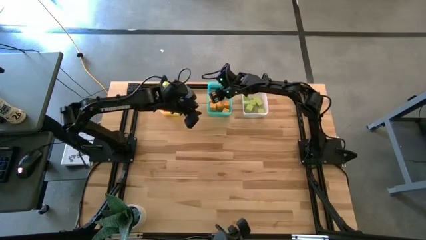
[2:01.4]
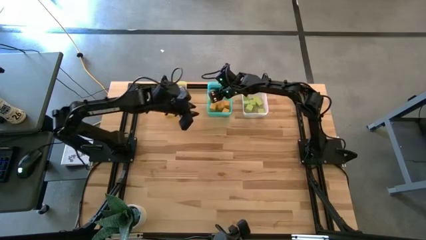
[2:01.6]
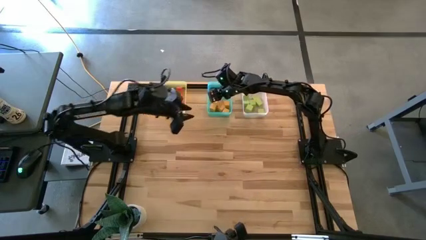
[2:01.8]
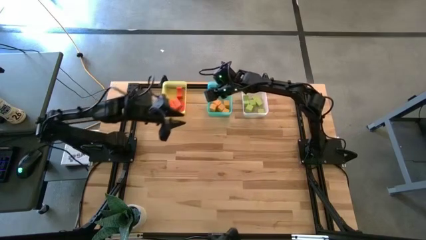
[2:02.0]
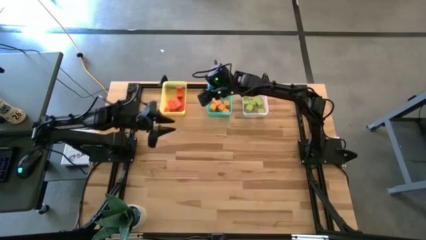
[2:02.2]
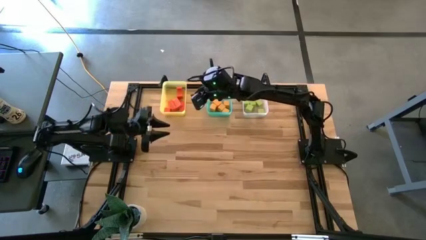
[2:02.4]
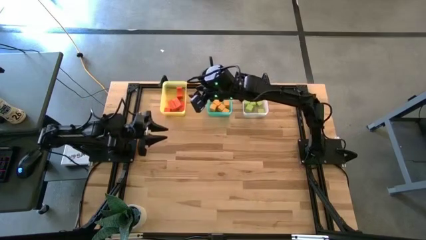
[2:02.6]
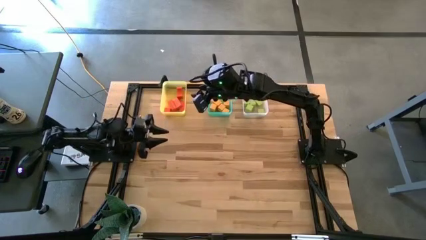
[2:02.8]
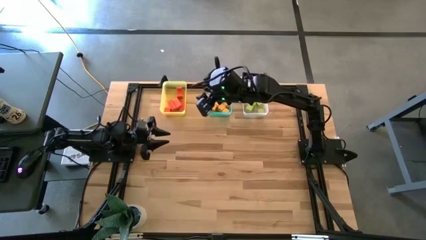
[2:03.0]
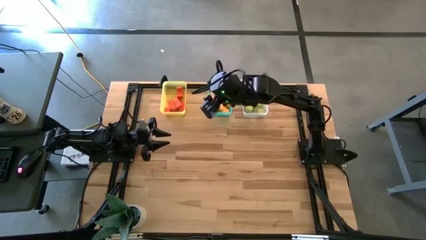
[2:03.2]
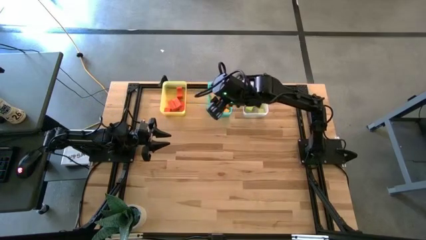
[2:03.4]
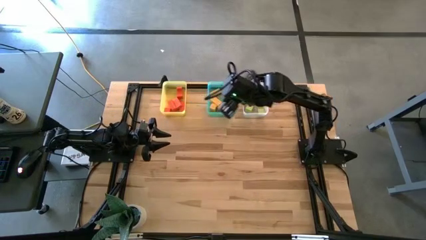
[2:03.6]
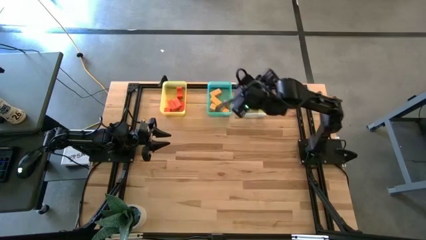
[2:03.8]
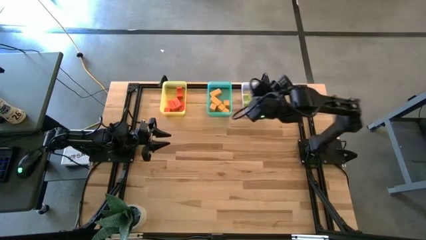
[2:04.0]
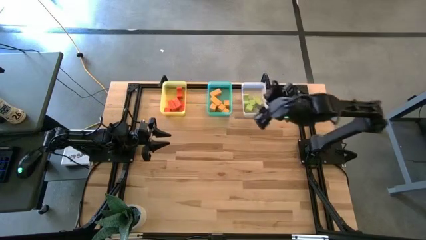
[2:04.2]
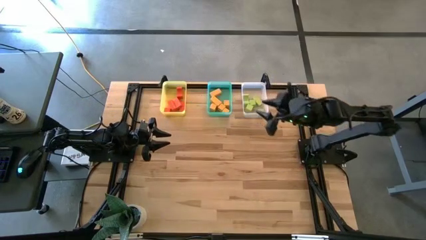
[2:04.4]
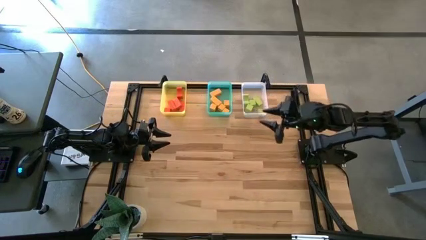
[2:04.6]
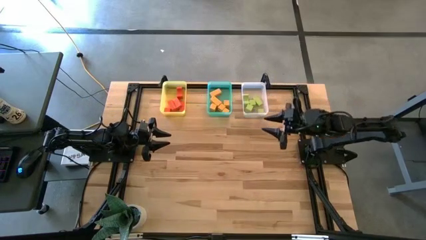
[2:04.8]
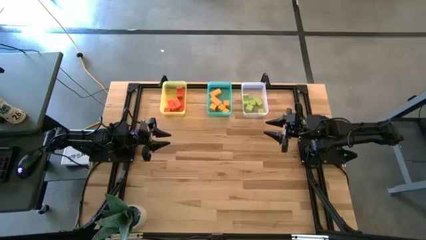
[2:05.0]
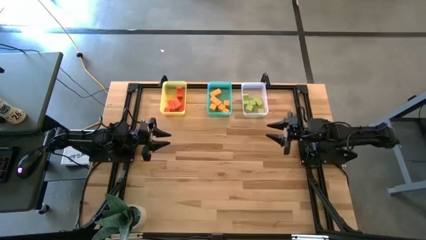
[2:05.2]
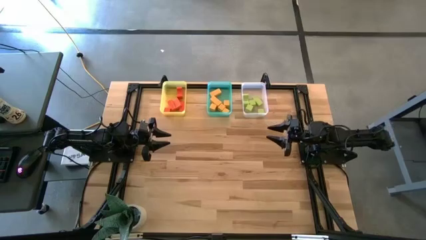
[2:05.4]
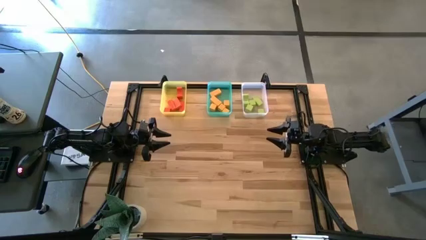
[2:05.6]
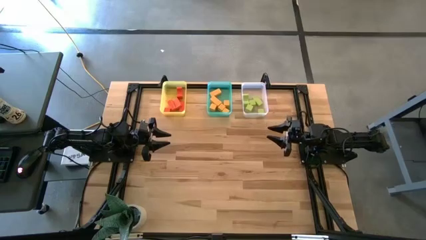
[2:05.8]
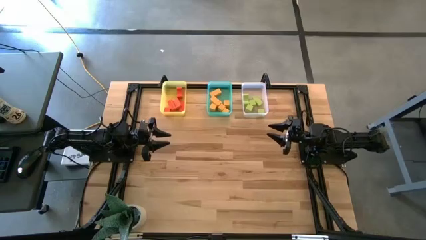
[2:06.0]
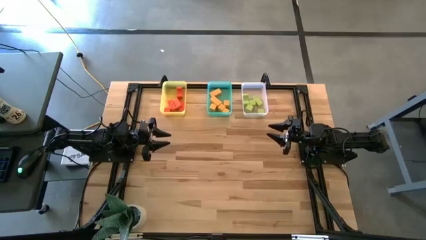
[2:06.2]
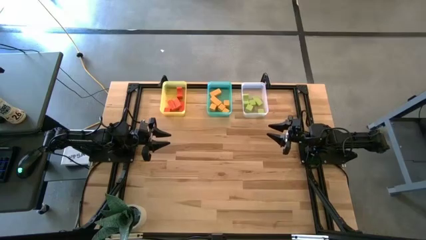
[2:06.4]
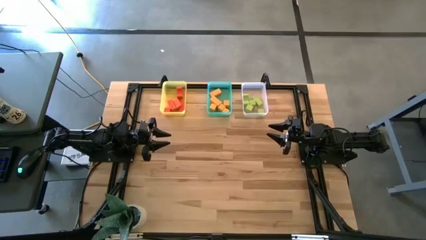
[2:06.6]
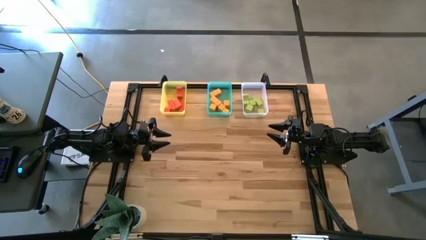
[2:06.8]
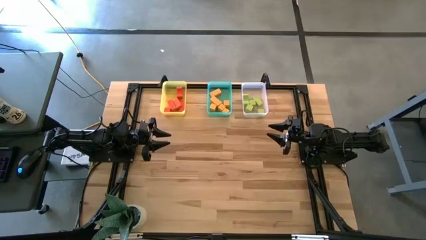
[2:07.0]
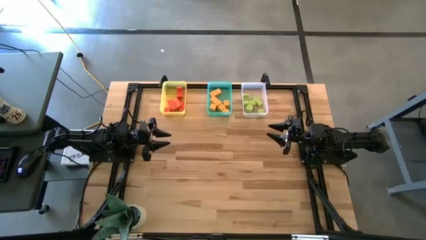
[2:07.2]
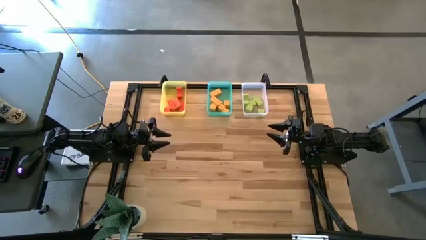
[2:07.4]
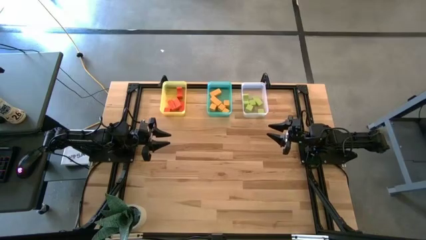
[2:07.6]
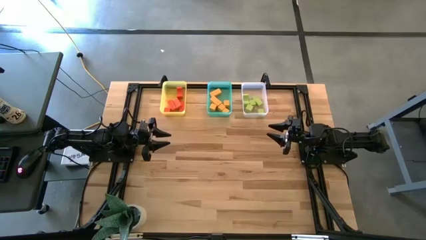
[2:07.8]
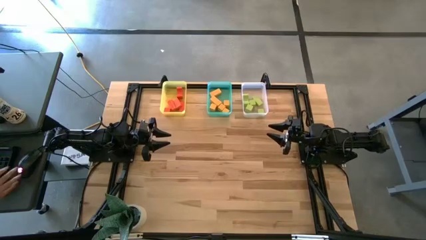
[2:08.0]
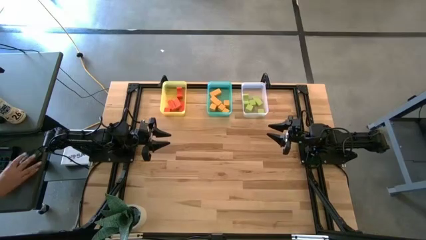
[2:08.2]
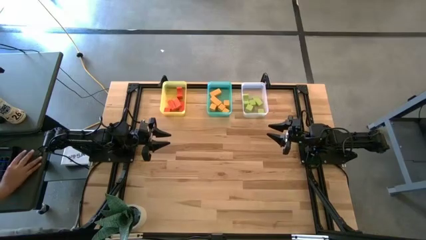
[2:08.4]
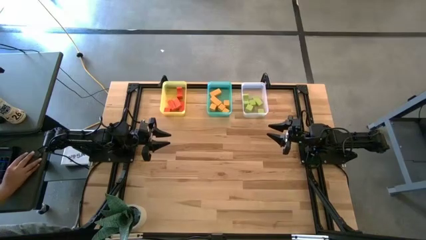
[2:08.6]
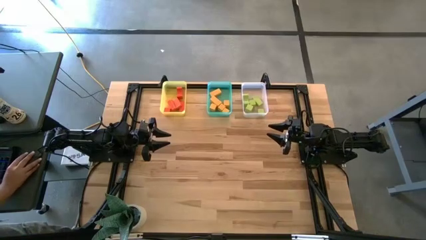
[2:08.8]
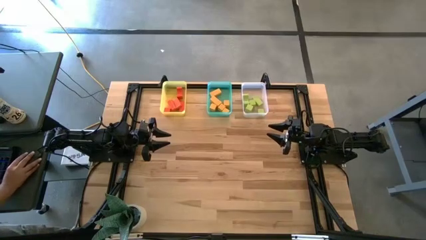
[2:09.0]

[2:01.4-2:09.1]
Task: Sort & place blocks by color
Return to Home Position

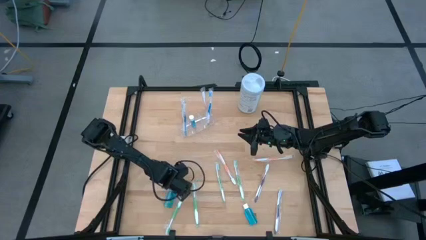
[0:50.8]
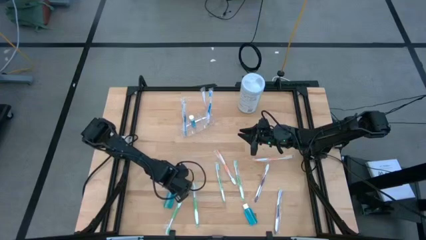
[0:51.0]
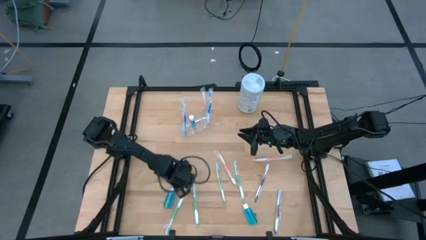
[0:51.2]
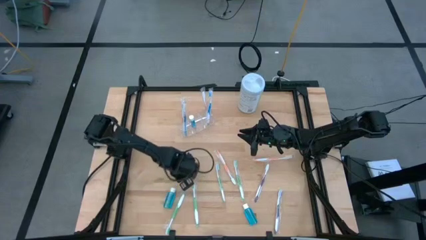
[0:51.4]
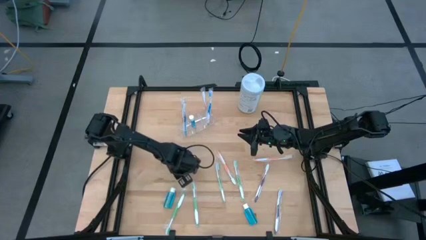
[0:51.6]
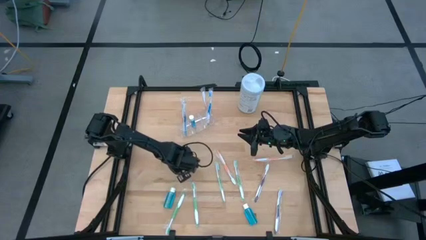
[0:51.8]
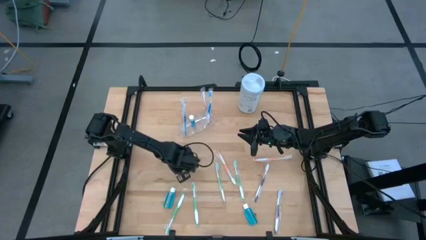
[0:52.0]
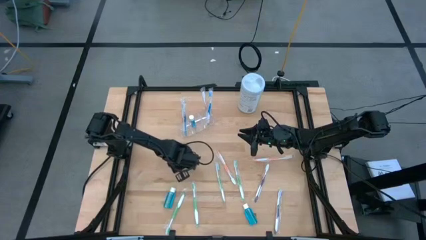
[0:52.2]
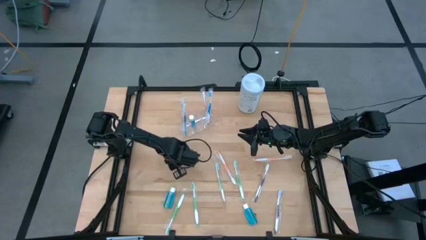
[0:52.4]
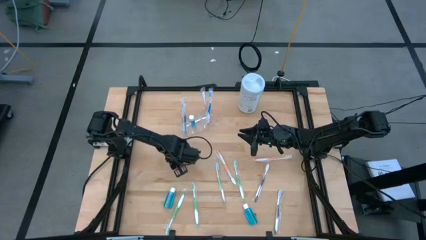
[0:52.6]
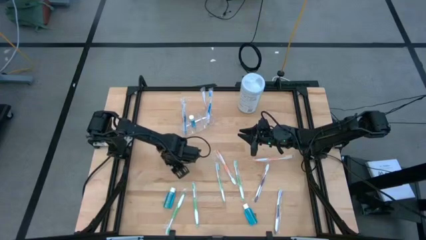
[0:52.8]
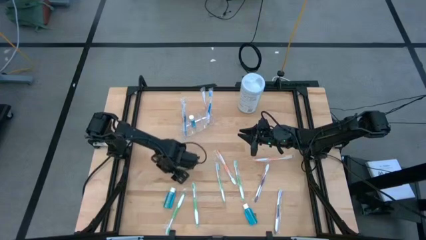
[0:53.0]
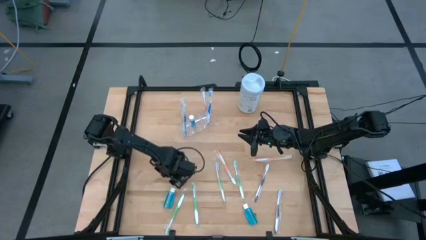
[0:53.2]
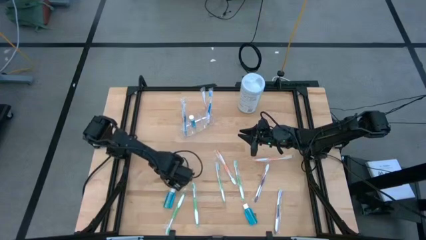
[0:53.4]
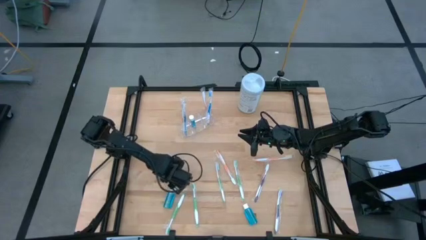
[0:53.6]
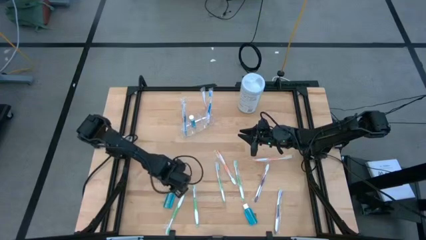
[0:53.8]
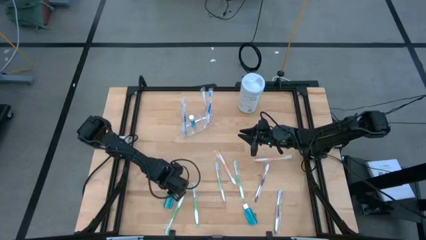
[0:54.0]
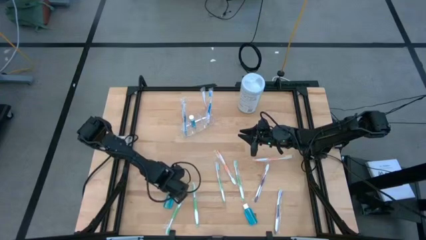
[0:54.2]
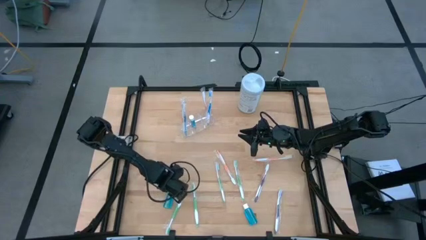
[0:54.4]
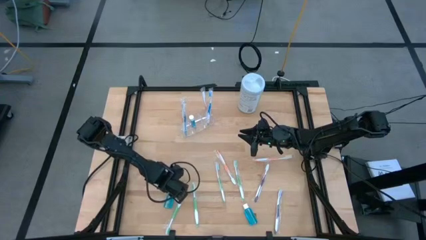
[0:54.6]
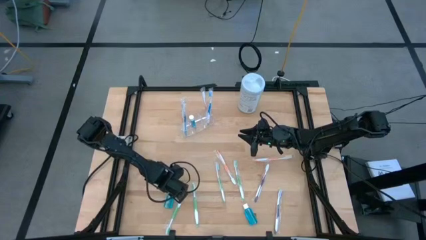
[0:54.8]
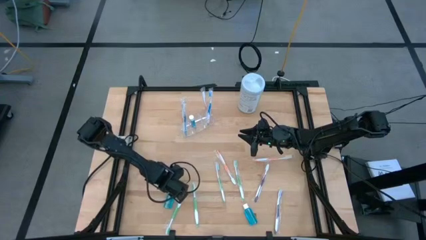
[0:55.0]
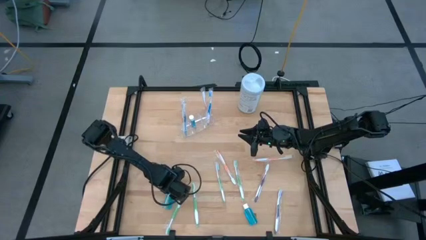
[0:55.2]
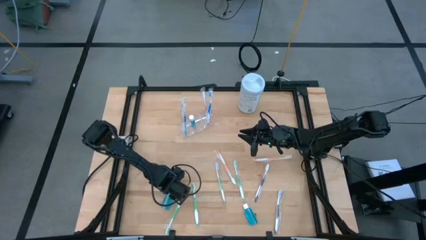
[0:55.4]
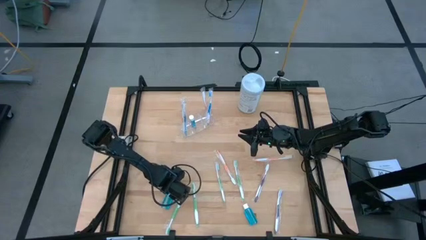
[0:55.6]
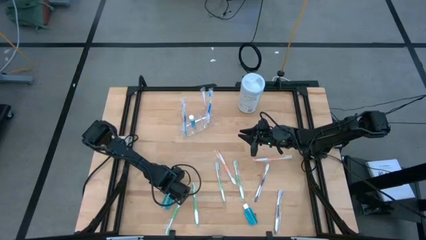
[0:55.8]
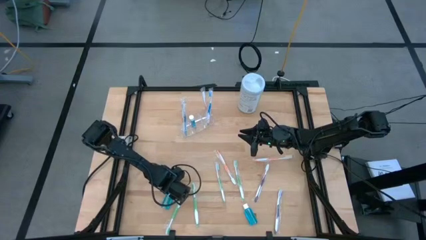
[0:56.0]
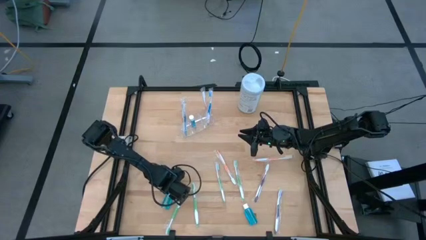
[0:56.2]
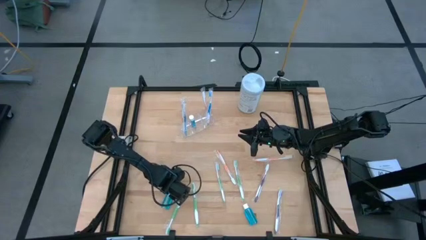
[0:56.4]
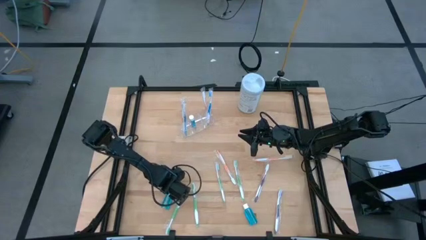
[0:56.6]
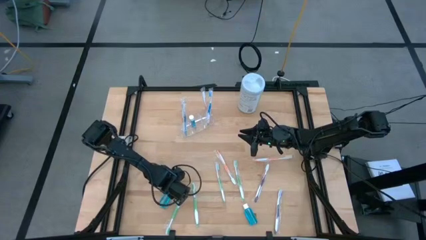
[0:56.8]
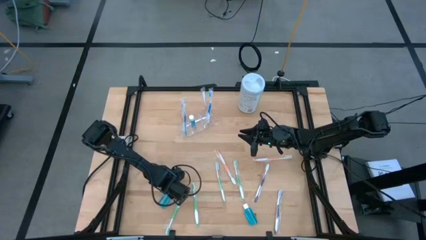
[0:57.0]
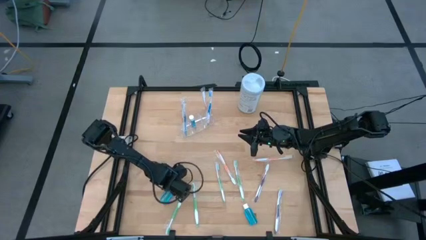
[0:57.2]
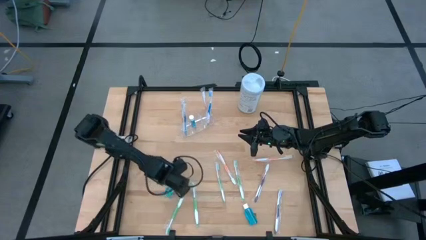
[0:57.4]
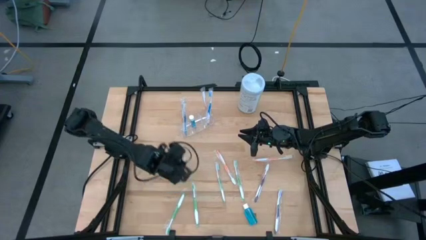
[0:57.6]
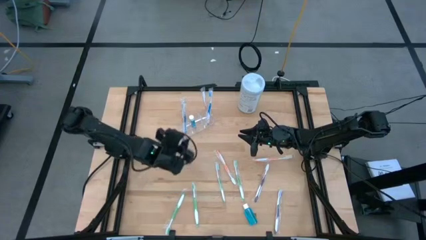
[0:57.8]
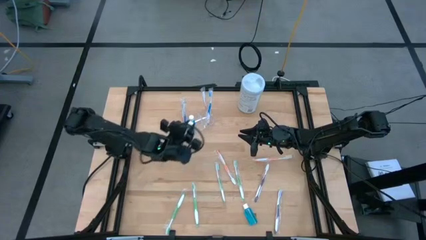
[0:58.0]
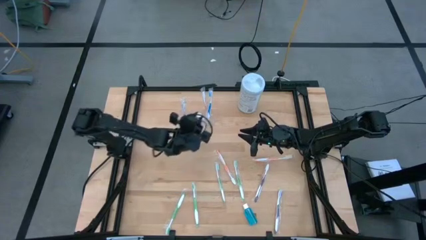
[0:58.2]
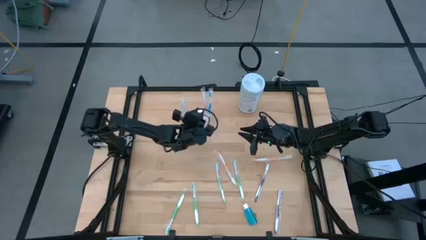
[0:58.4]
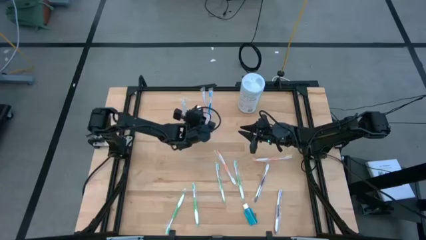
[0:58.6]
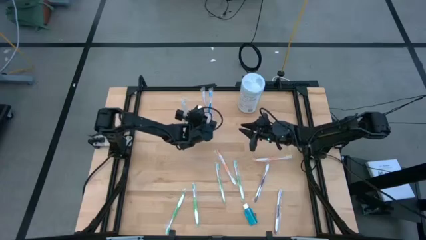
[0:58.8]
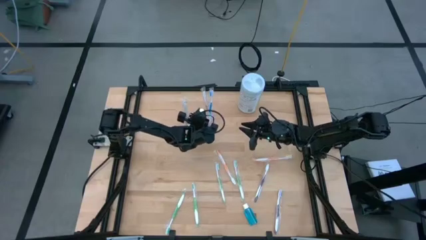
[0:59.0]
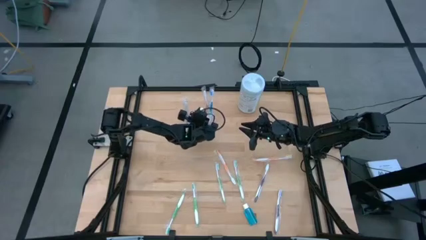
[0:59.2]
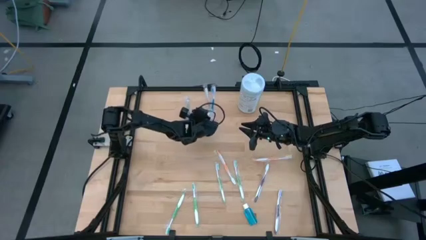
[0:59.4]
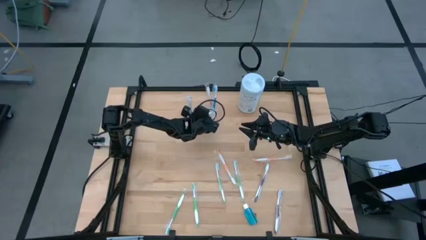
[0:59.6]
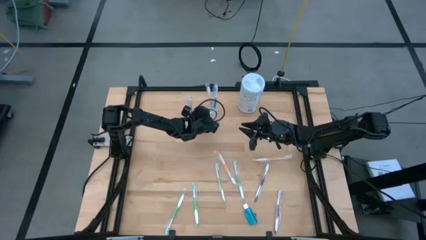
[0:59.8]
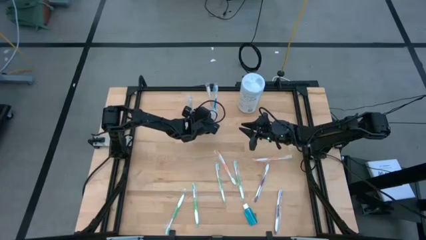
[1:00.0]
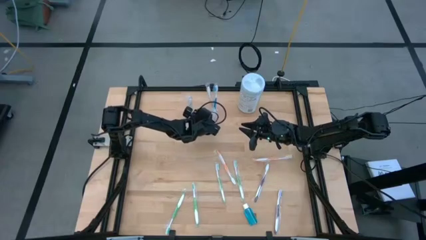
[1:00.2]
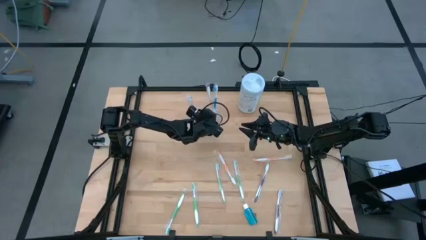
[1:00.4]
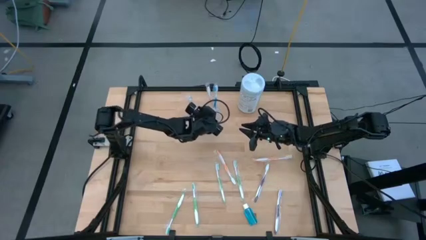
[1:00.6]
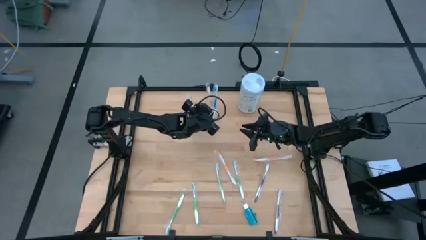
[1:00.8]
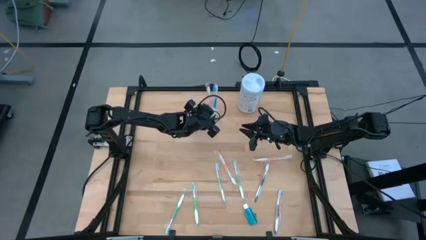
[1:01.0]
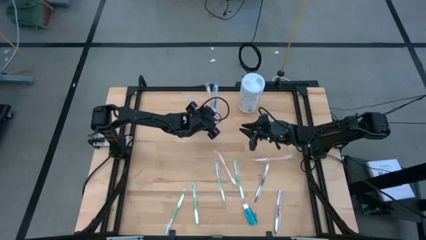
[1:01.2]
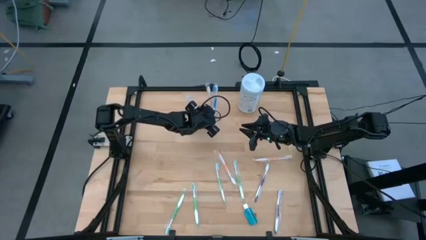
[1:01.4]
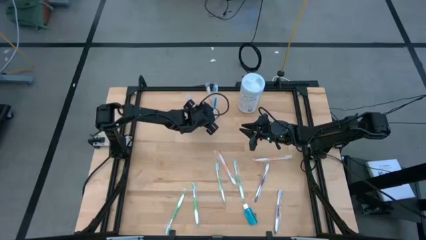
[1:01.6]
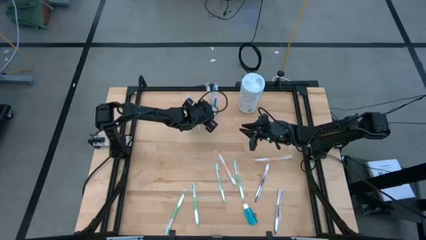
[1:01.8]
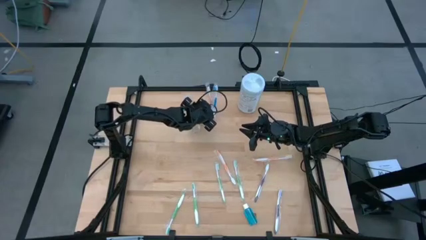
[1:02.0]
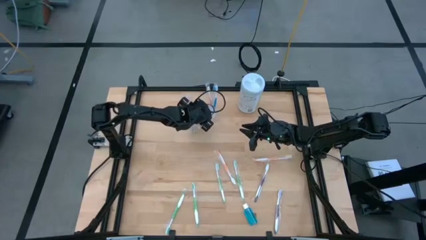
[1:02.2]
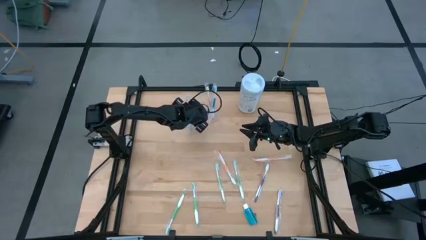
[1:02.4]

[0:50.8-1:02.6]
Task: Pick & Place toothbrushing station
Put the blue mouthwash into the transparent organizer
